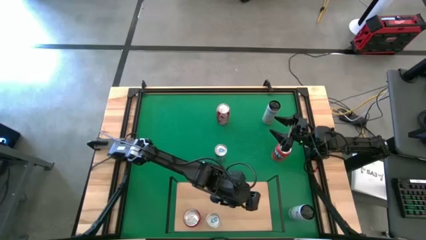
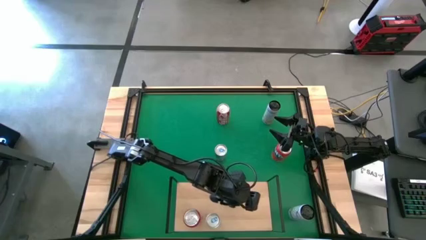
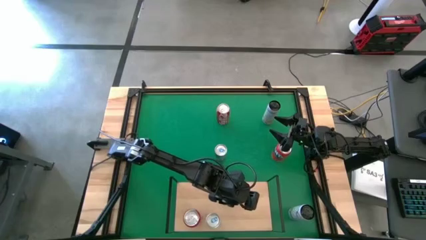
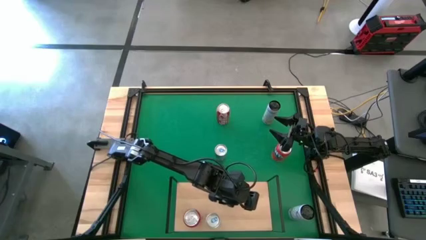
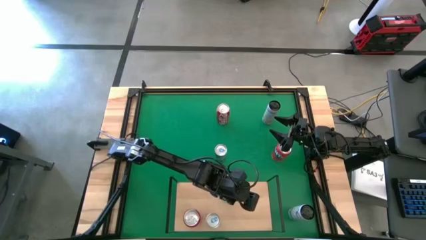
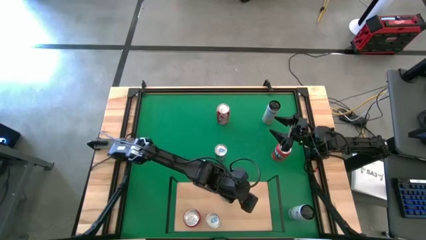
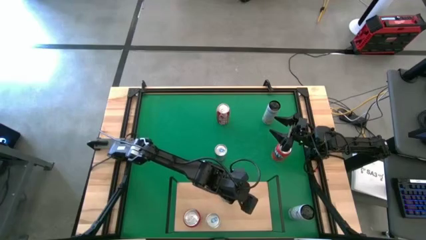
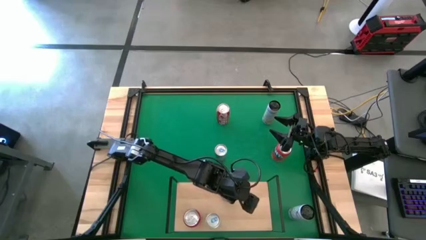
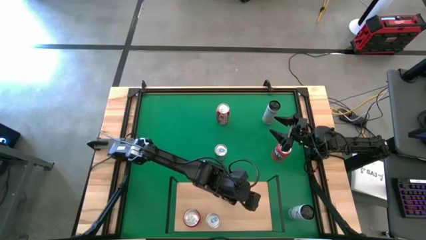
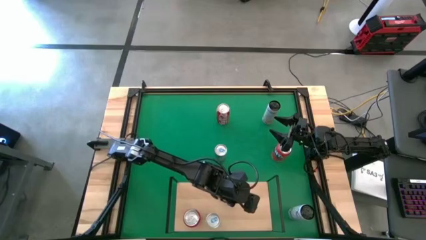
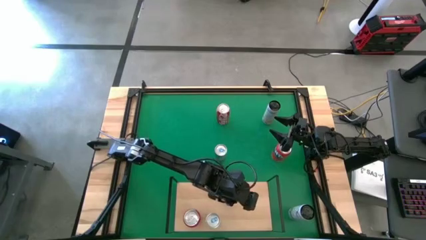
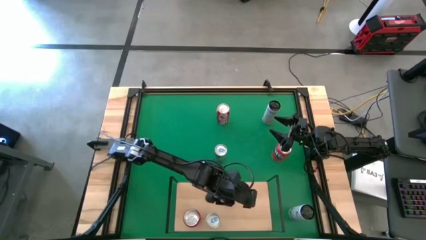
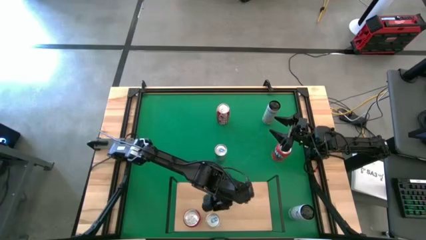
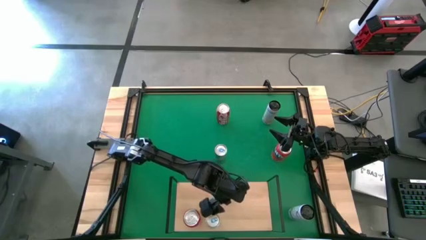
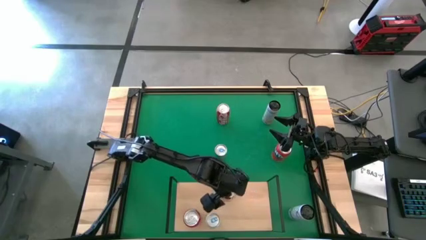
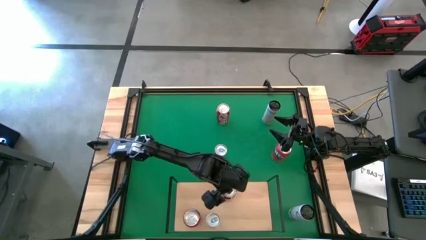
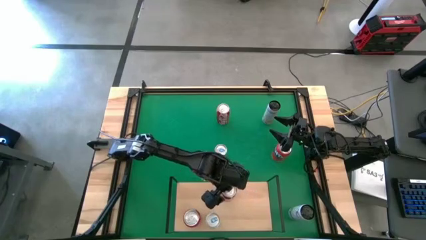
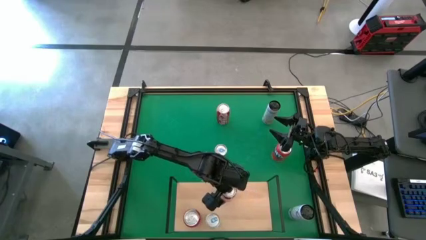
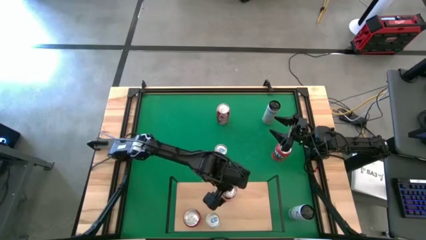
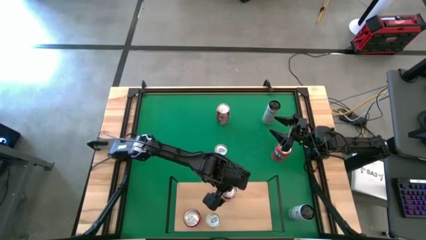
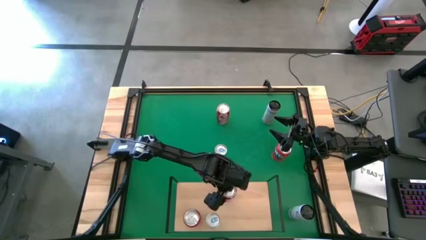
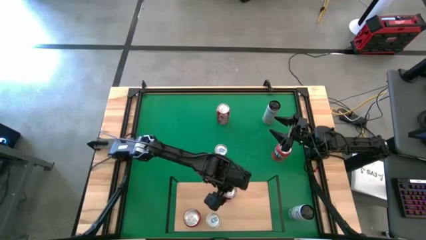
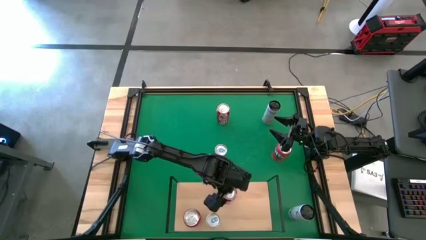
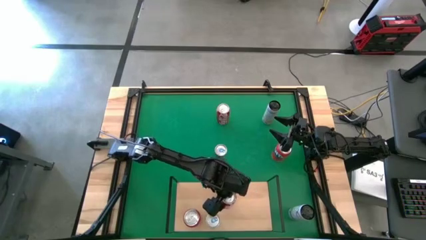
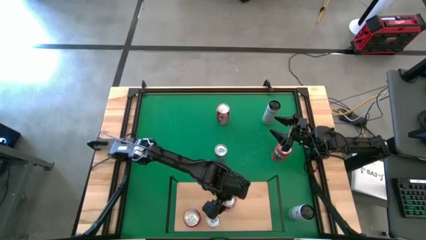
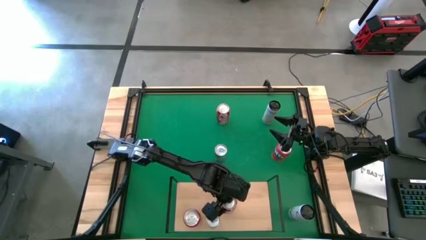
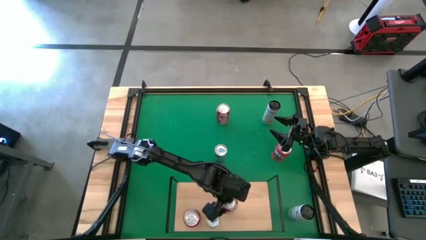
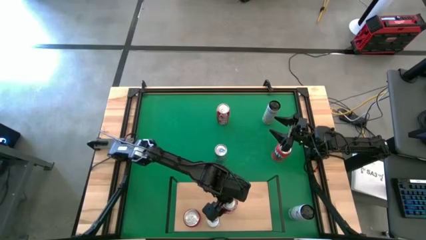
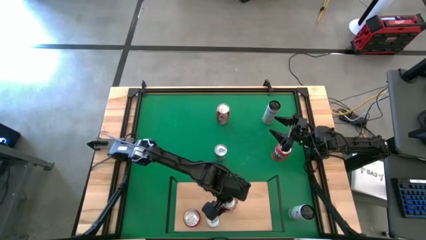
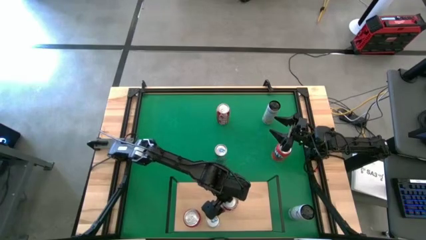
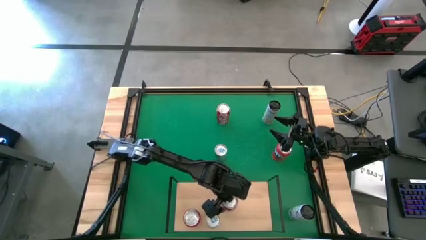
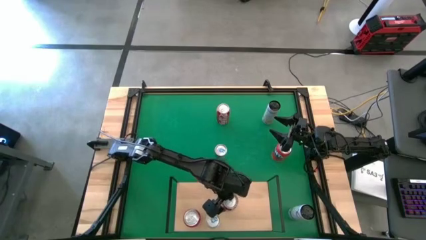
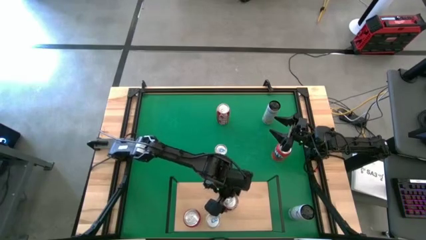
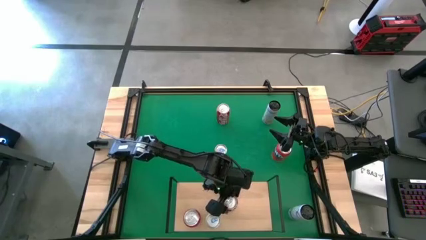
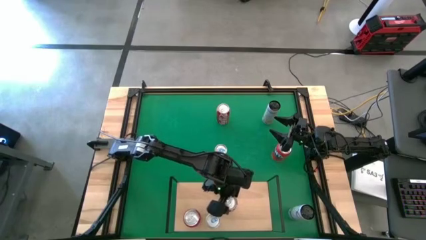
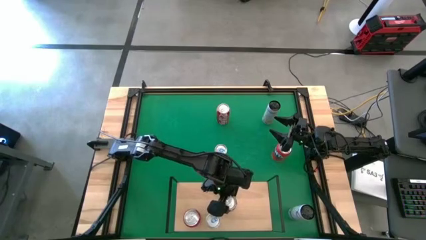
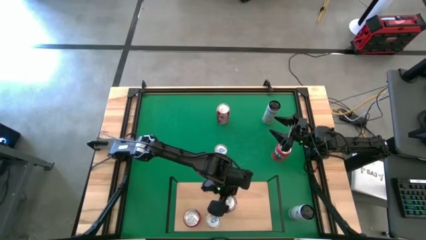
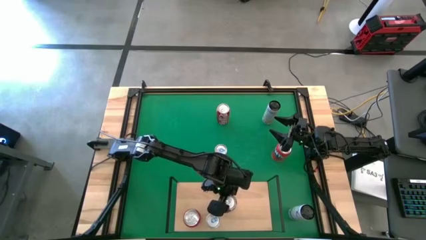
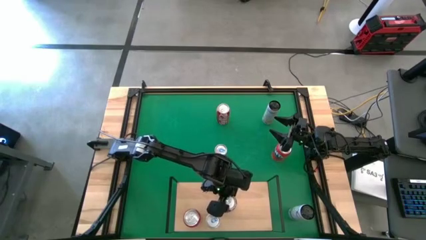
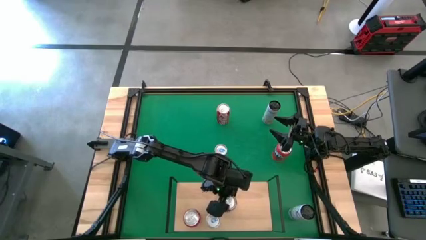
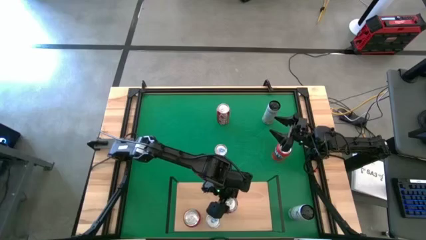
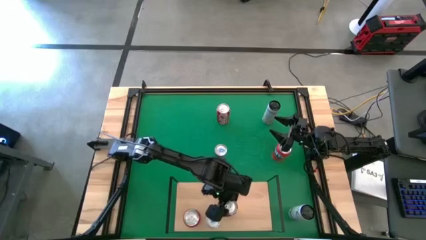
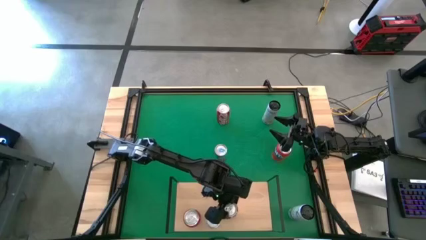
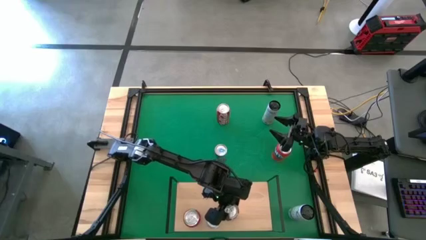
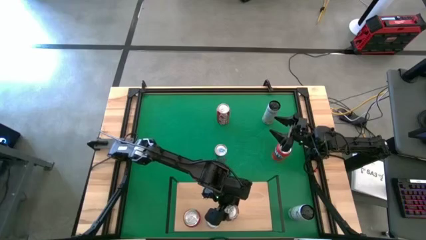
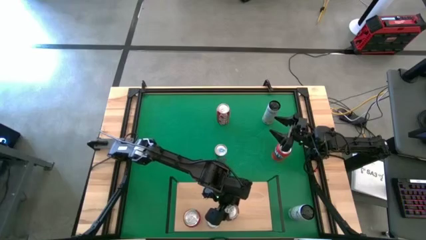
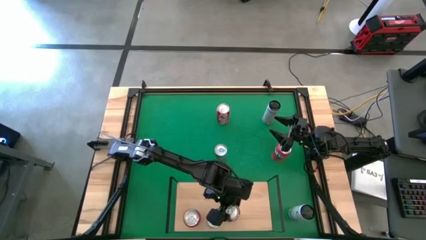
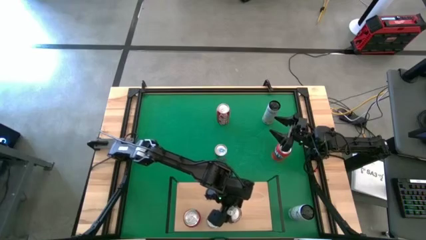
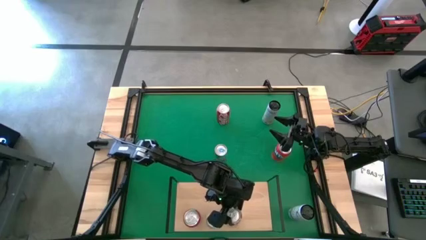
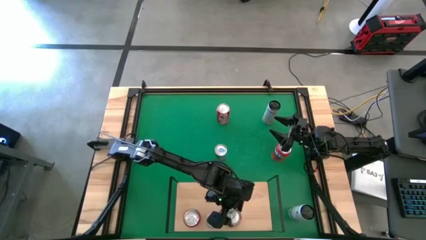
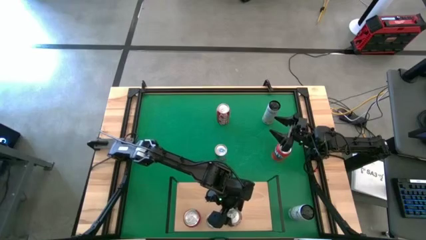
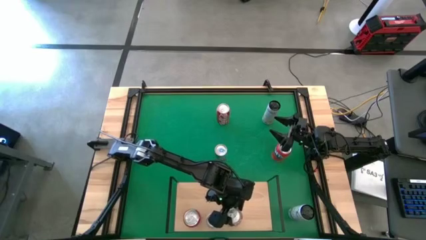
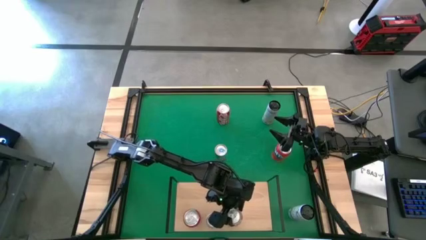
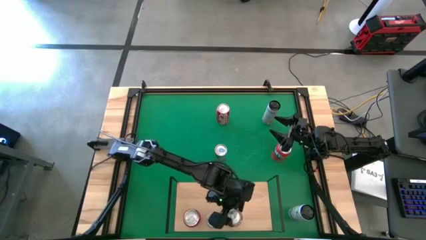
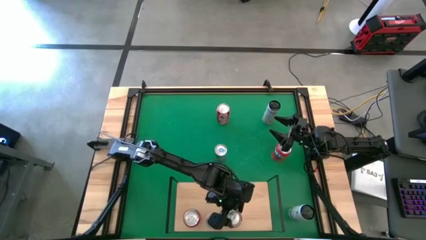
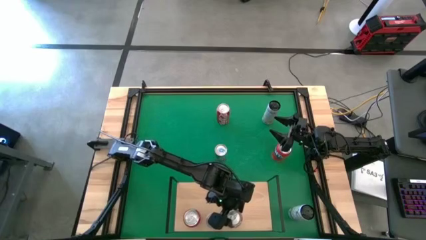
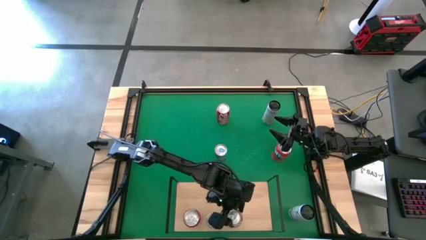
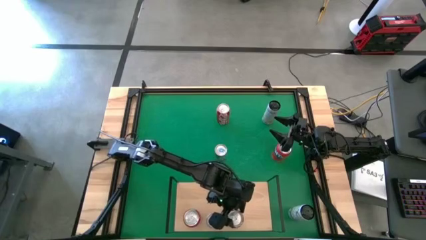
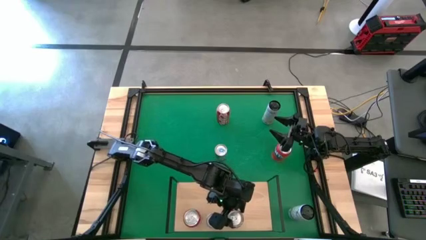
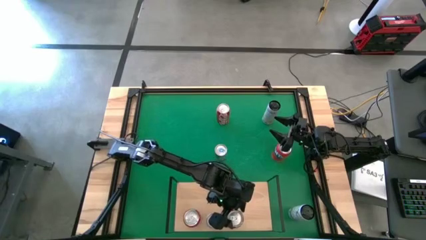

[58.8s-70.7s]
Task: Place canned beverage on shelf
Put the bottom red soda can on the shelf
